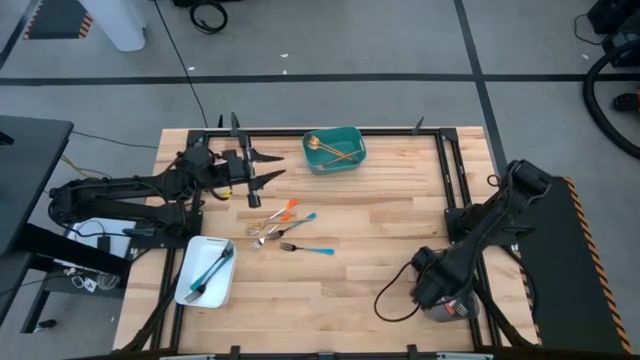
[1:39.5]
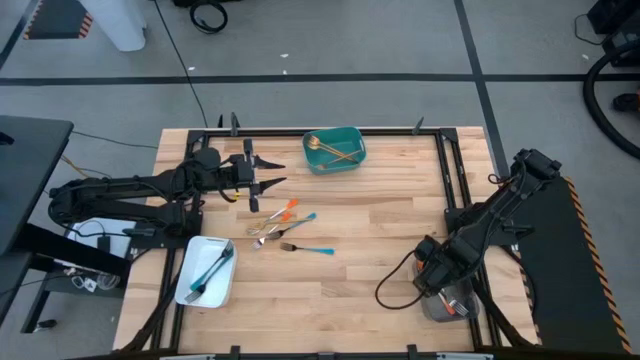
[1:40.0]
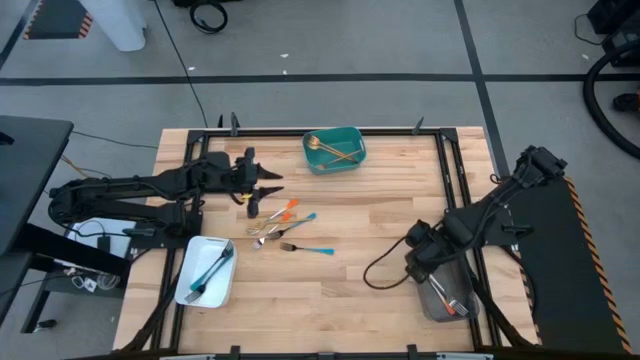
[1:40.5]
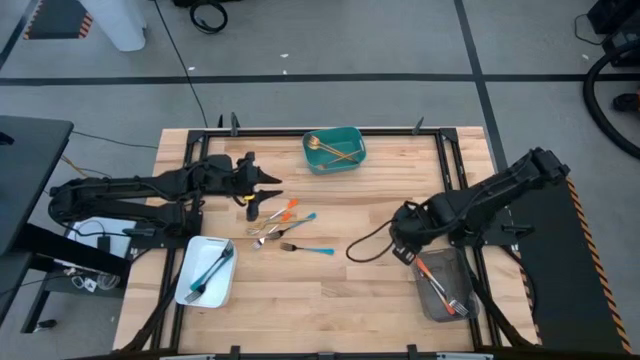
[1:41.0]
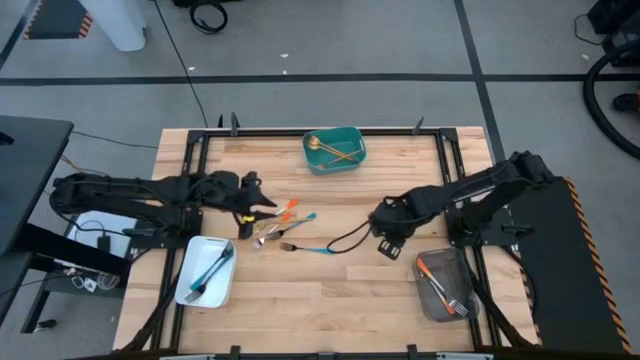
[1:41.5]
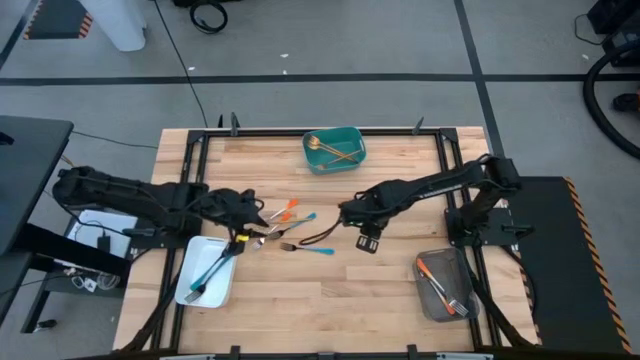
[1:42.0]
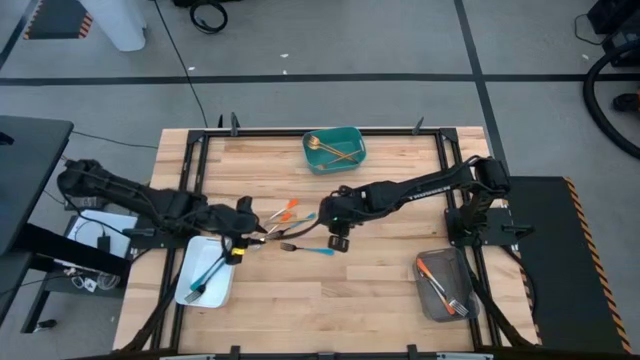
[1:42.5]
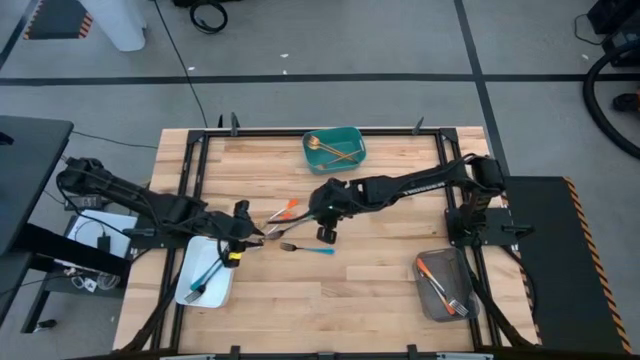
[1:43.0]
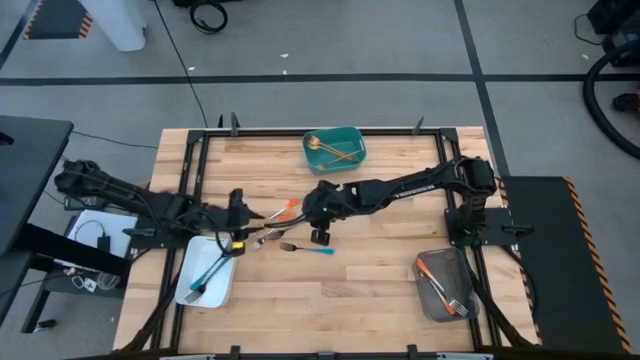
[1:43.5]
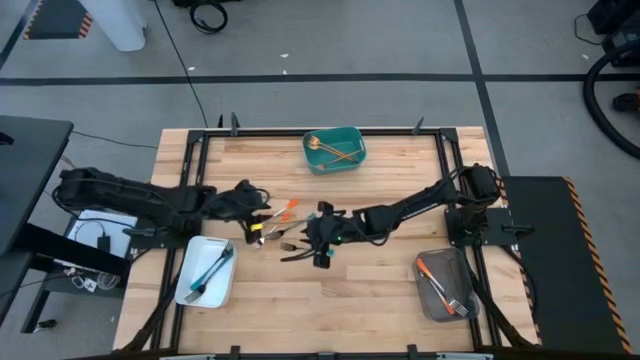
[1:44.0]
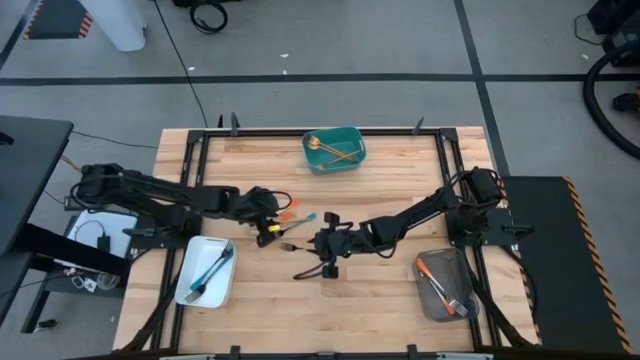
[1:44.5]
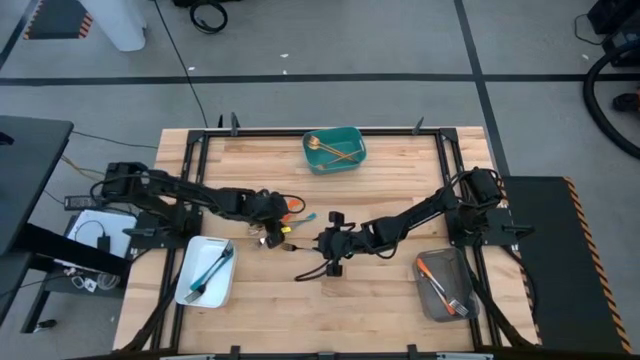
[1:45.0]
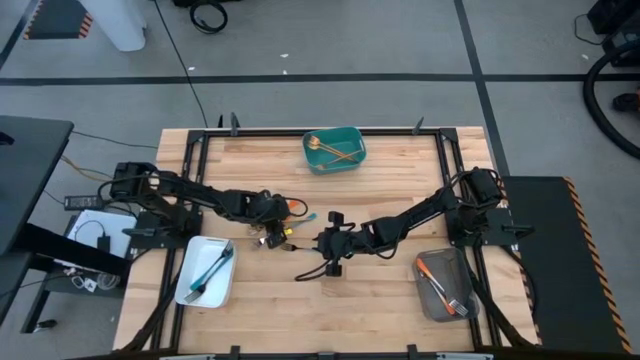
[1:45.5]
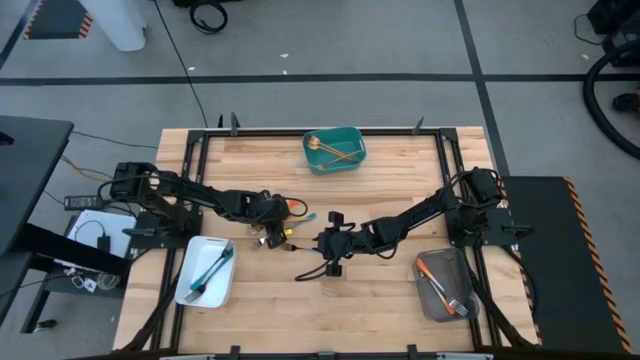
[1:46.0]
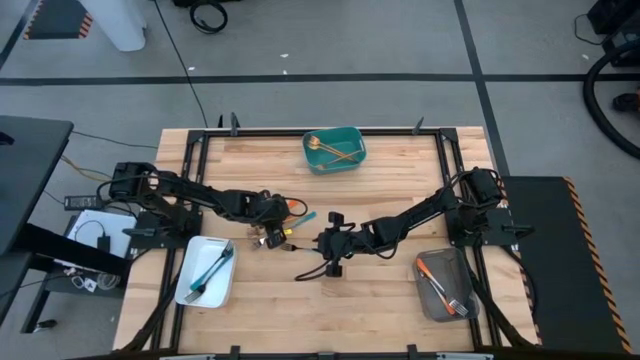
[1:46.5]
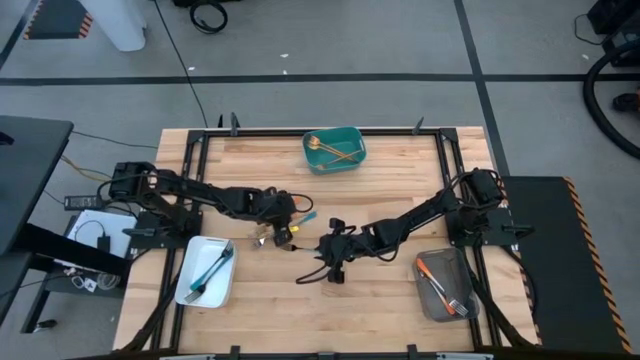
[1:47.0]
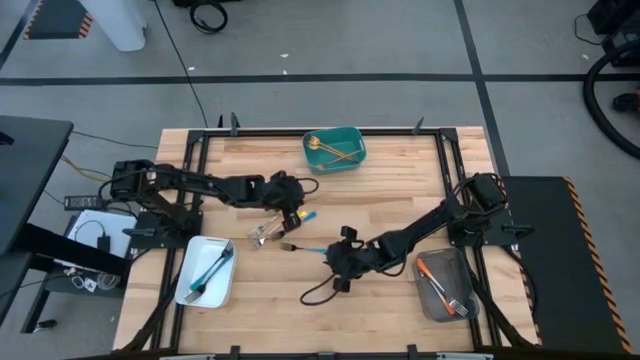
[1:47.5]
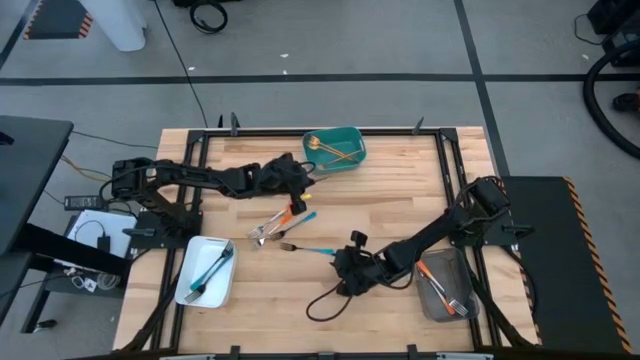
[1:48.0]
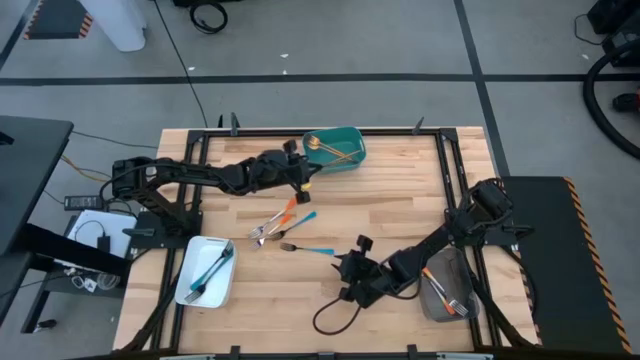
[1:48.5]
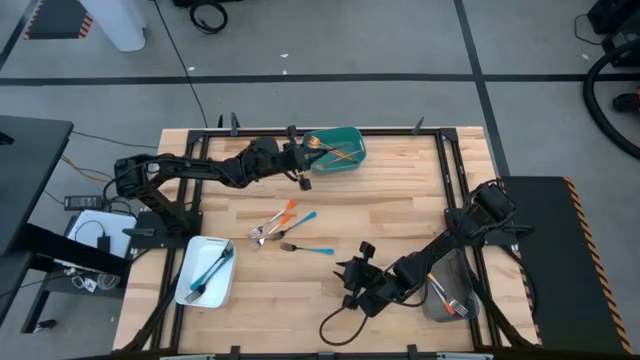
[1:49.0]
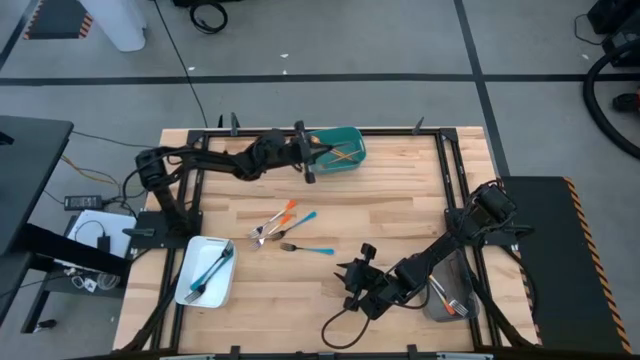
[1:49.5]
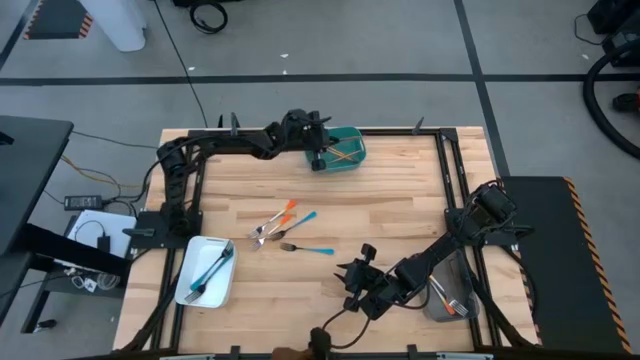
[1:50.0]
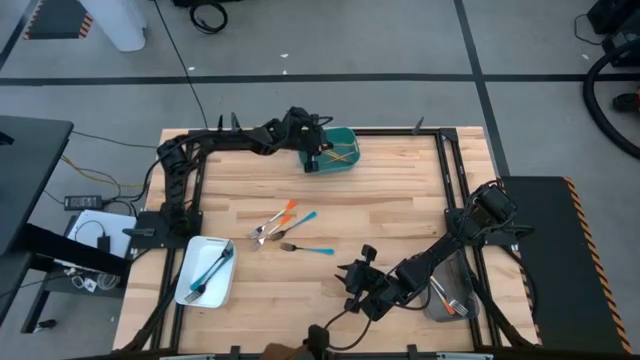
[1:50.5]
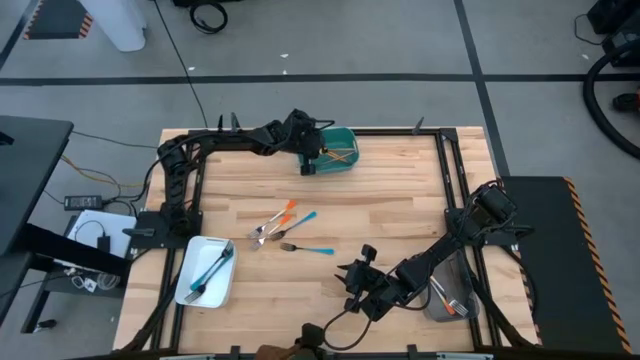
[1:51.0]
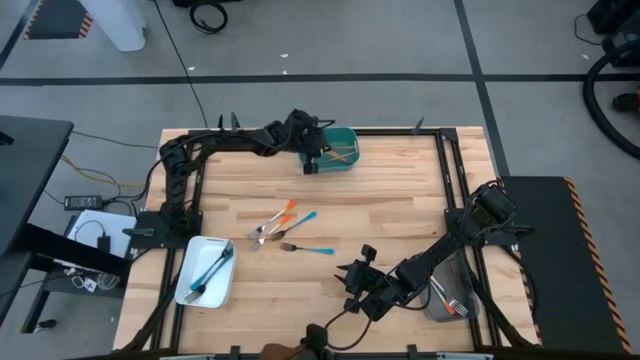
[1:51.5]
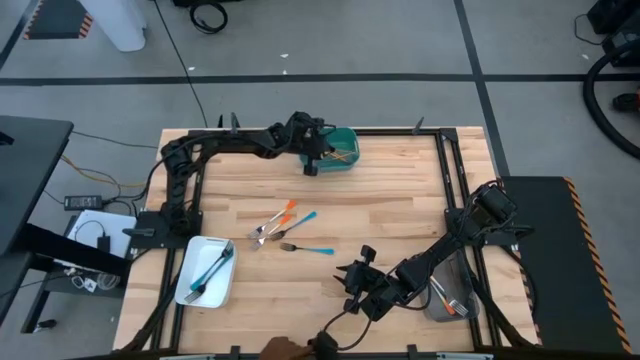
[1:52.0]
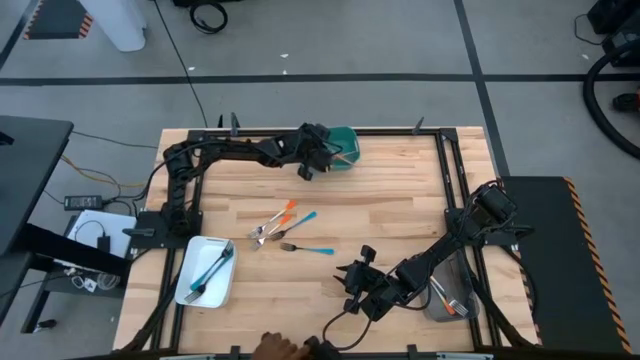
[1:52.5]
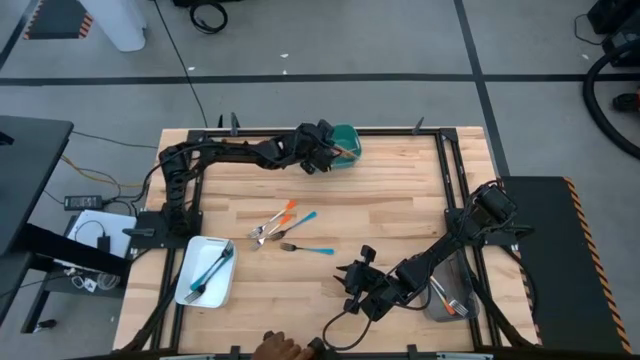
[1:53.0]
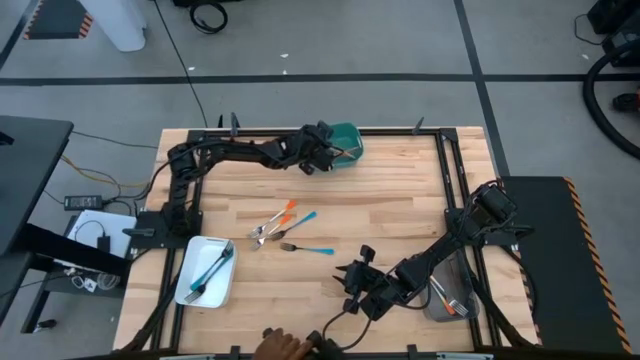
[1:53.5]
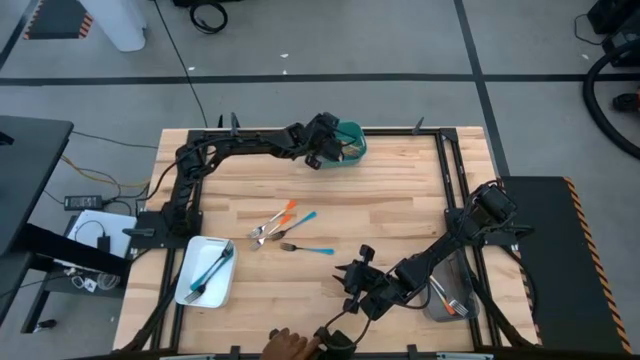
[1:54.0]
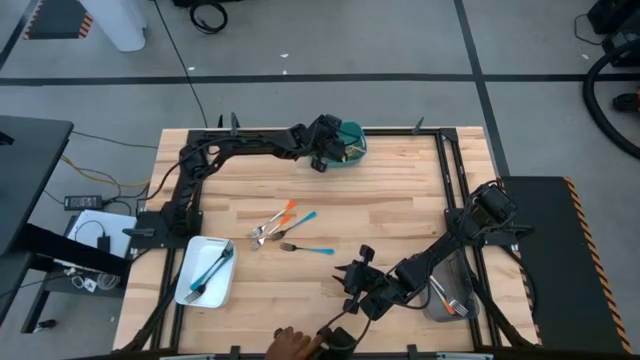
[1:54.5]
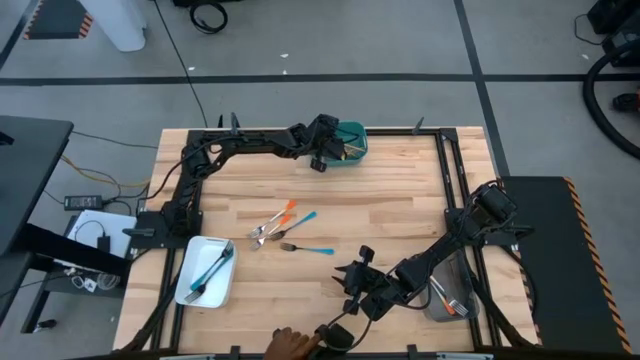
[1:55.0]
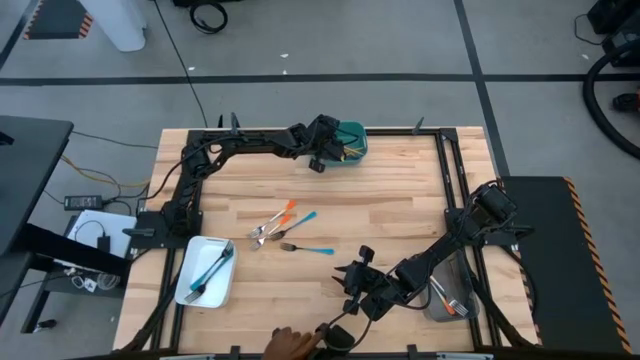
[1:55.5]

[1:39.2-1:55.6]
Task: Sort silverware by color (type)
Put the gold fork into the blue bin

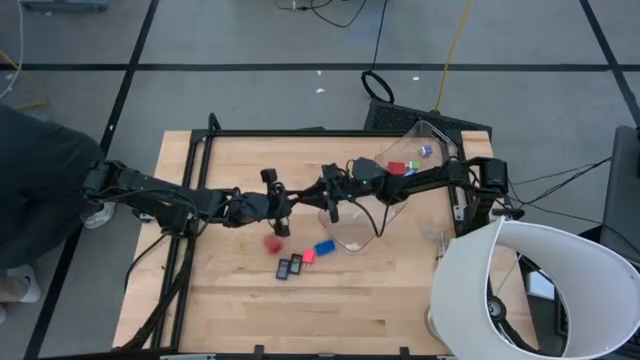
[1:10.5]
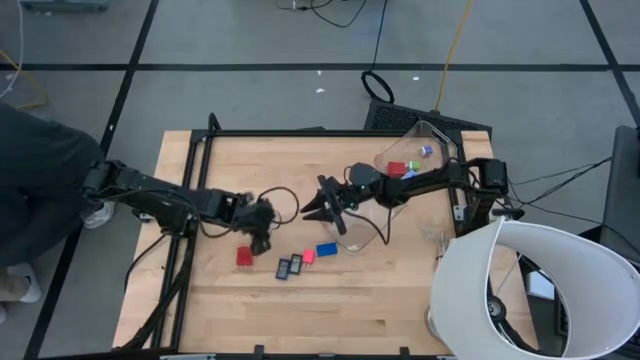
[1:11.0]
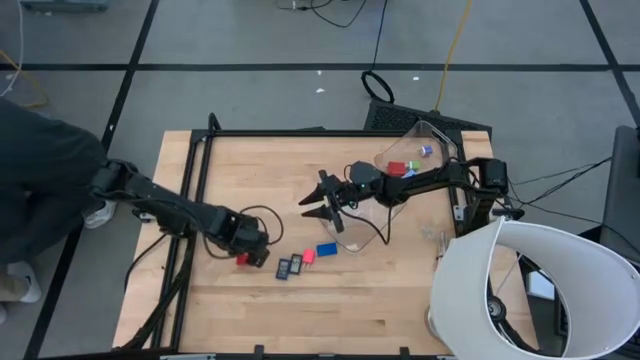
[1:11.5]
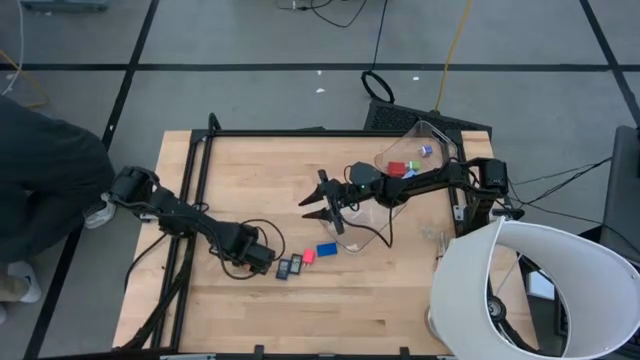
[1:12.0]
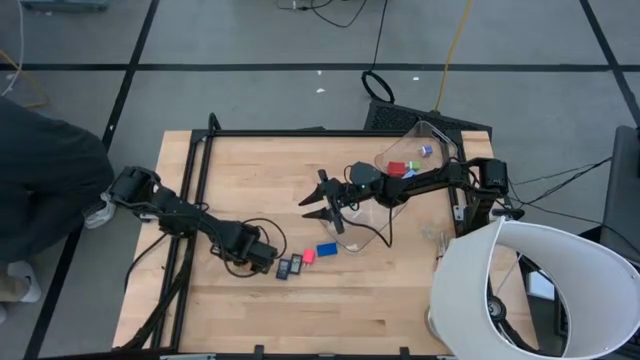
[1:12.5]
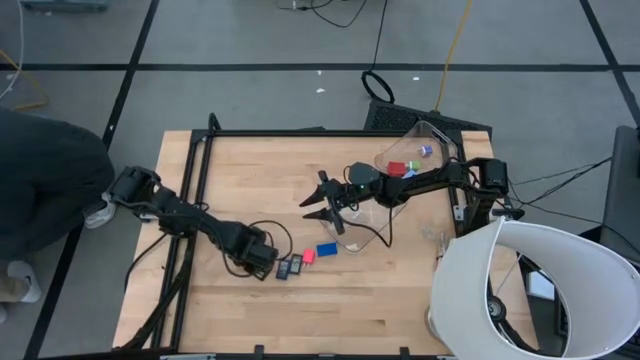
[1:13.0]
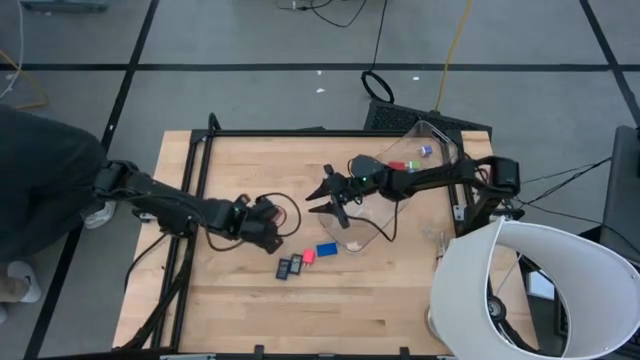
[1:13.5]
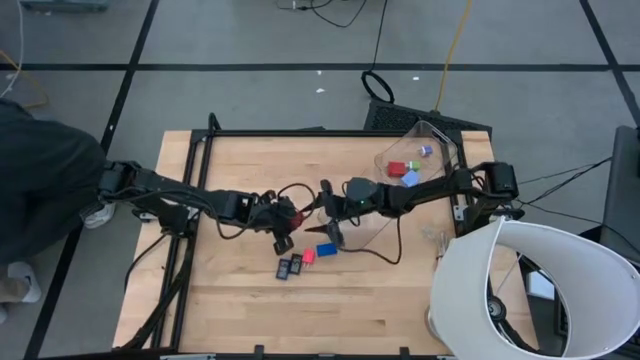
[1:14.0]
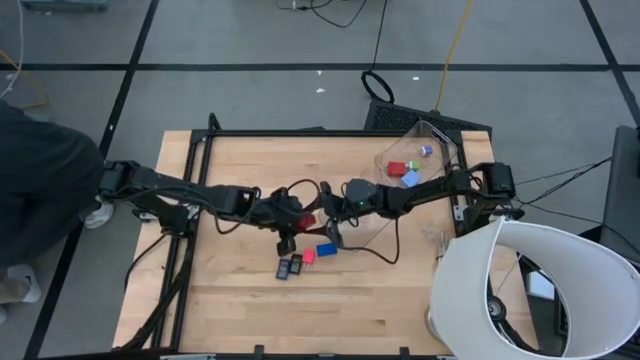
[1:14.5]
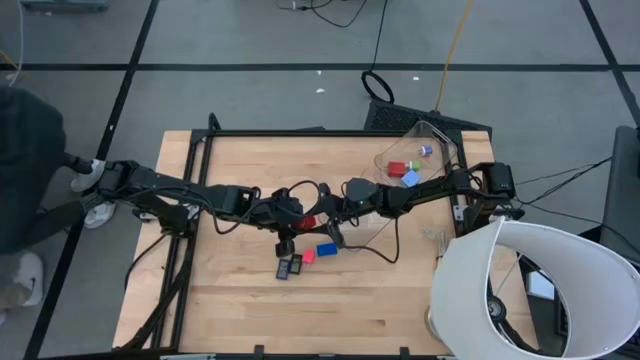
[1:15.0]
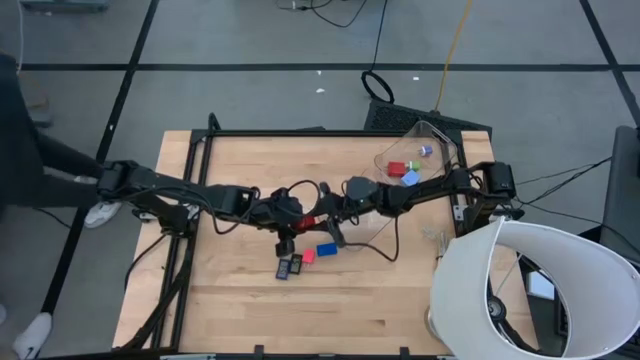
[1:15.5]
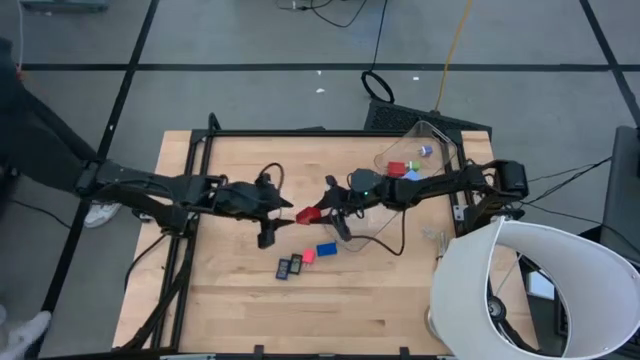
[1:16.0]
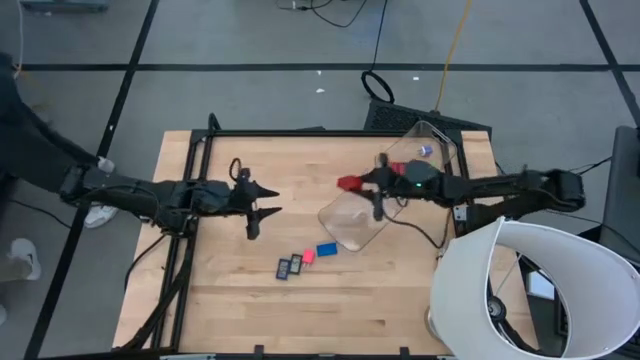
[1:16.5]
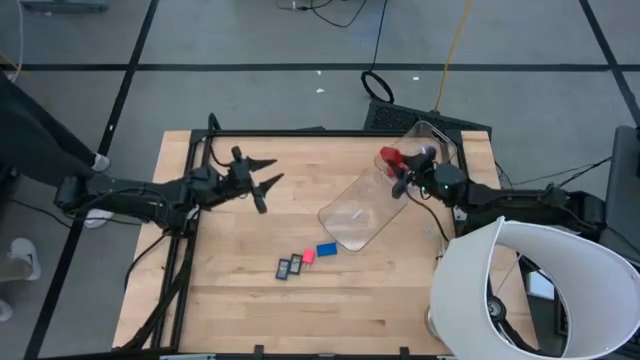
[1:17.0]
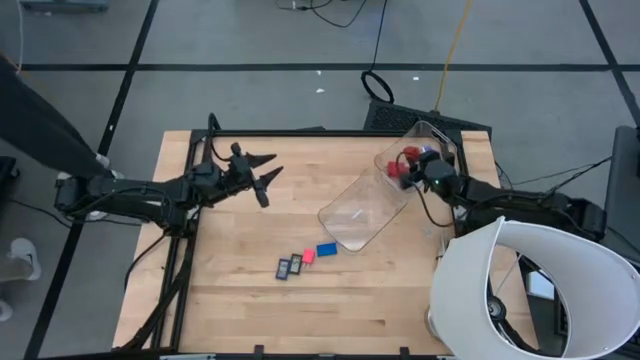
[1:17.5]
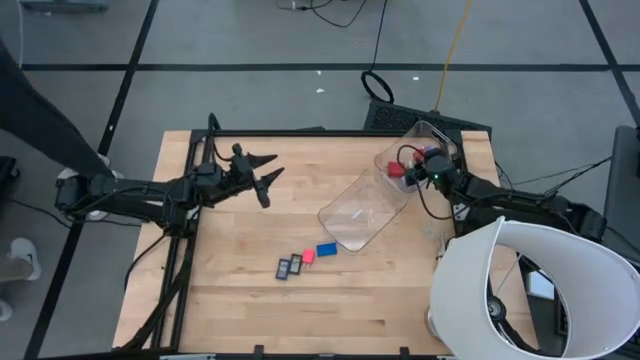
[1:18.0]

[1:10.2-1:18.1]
Task: Pick & Place Office items
Put the red charger adapter into the right transparent bin
